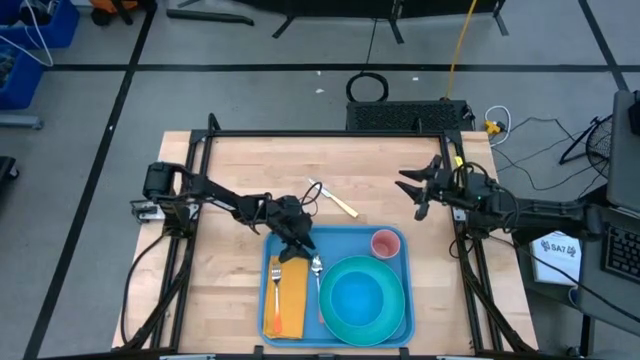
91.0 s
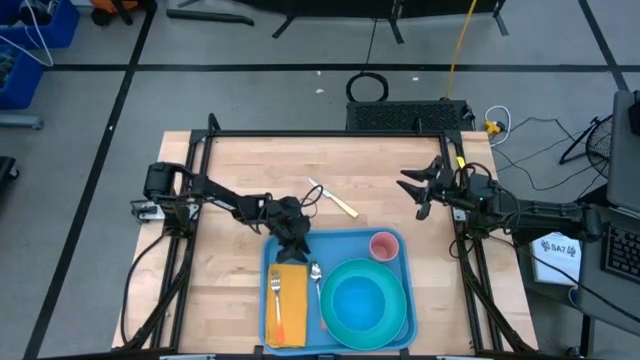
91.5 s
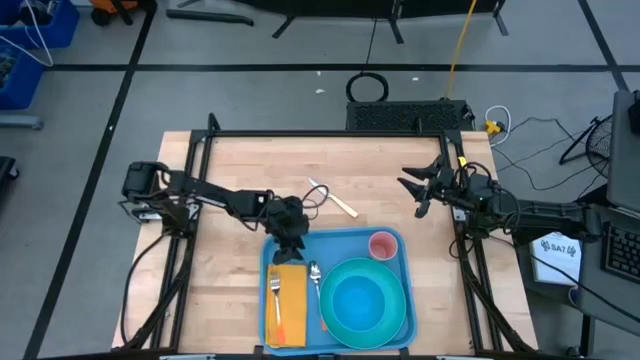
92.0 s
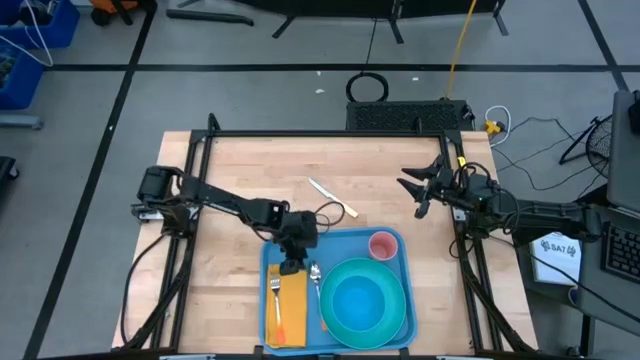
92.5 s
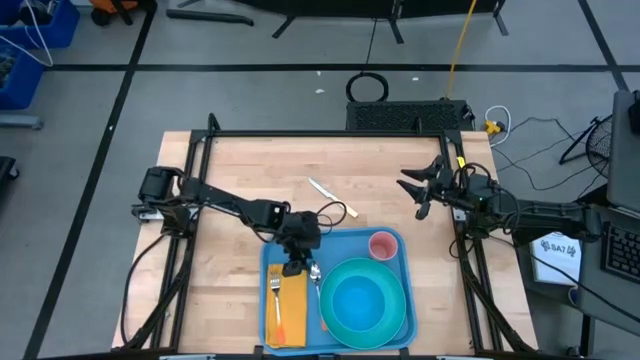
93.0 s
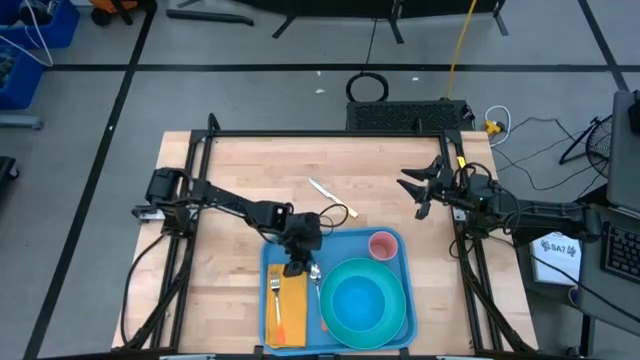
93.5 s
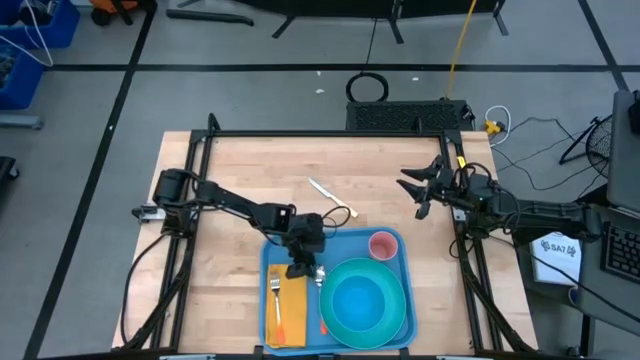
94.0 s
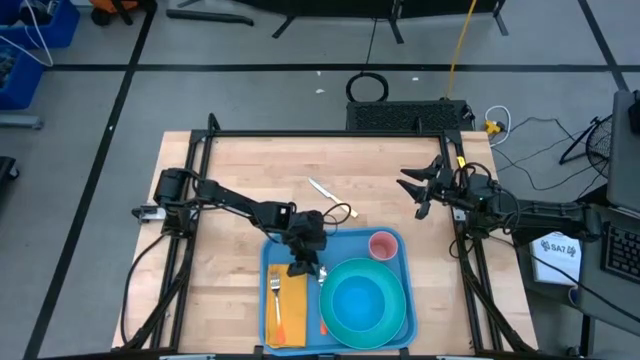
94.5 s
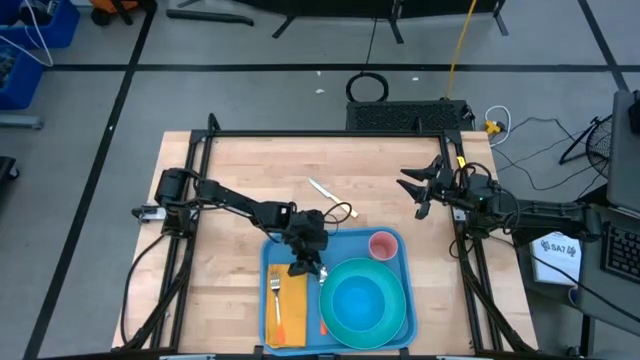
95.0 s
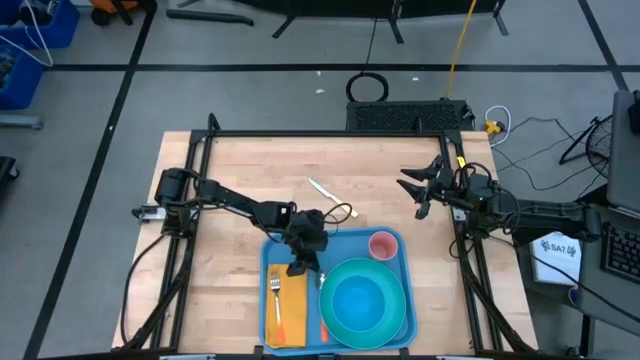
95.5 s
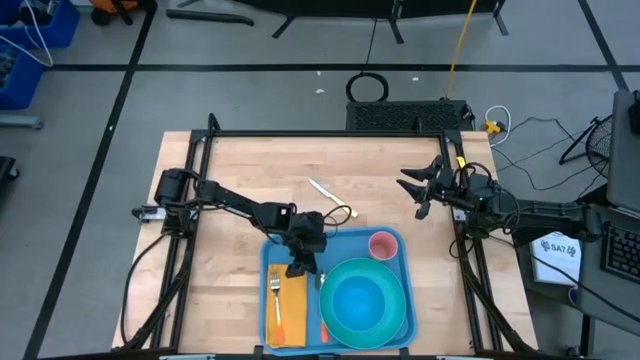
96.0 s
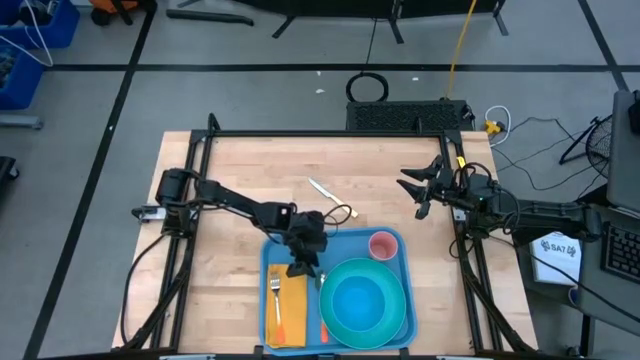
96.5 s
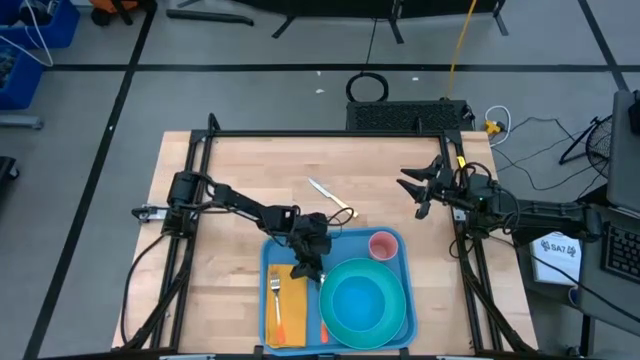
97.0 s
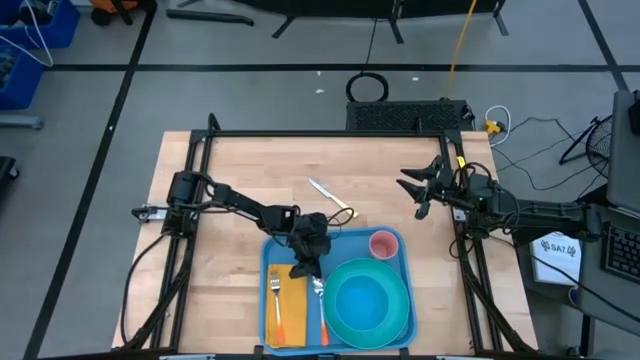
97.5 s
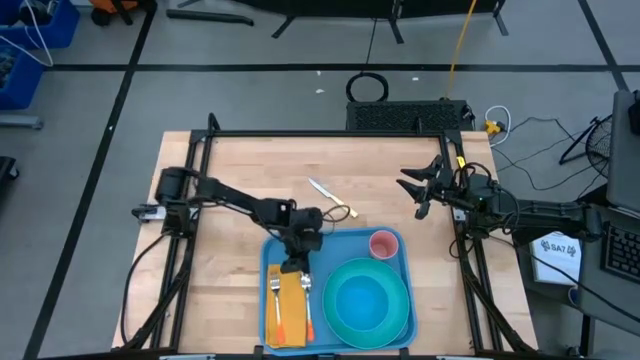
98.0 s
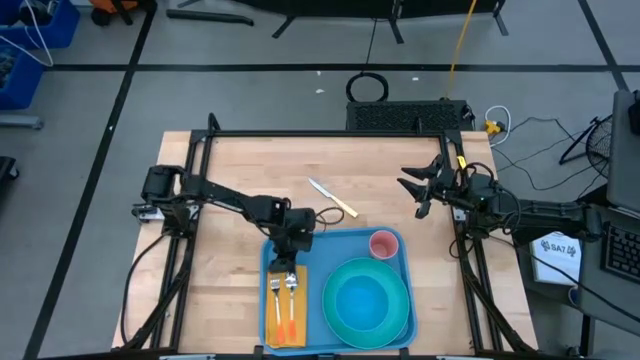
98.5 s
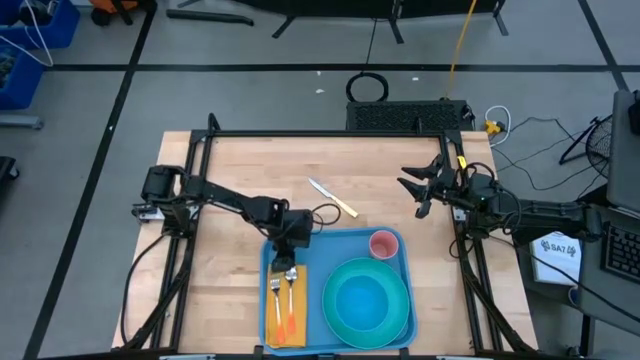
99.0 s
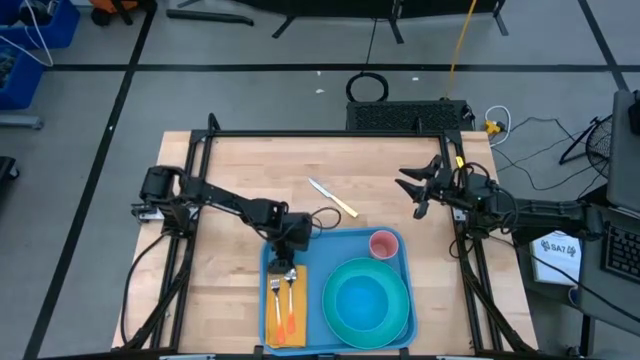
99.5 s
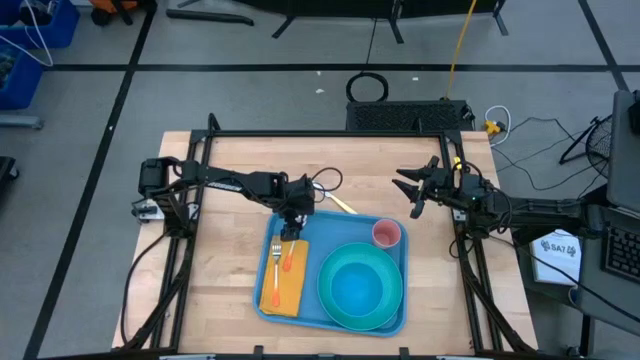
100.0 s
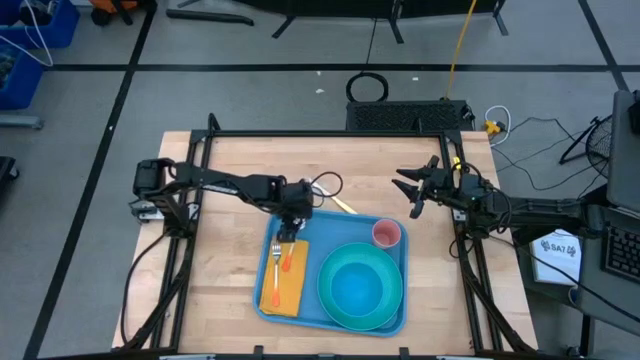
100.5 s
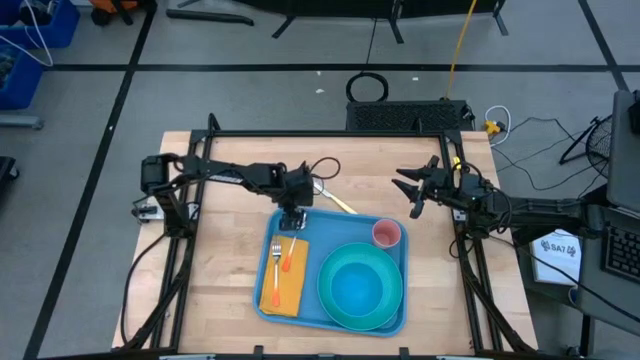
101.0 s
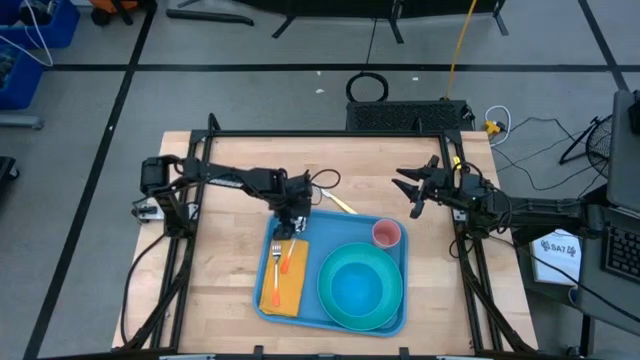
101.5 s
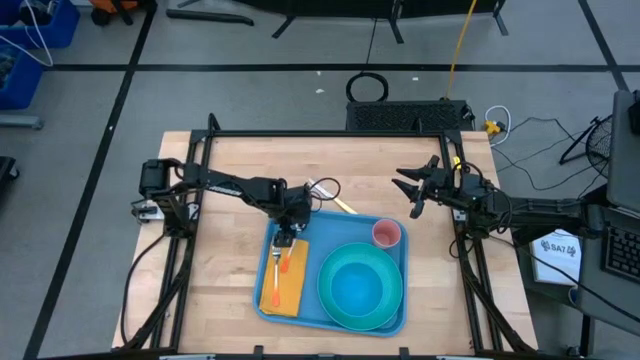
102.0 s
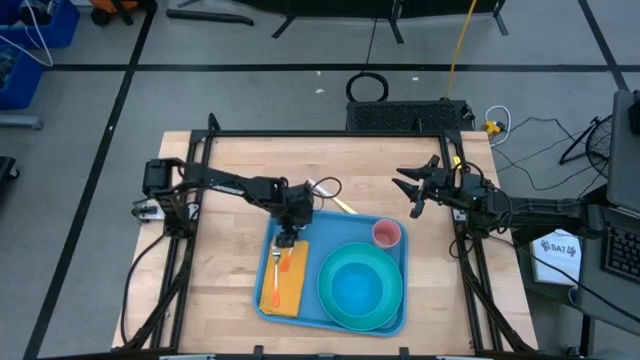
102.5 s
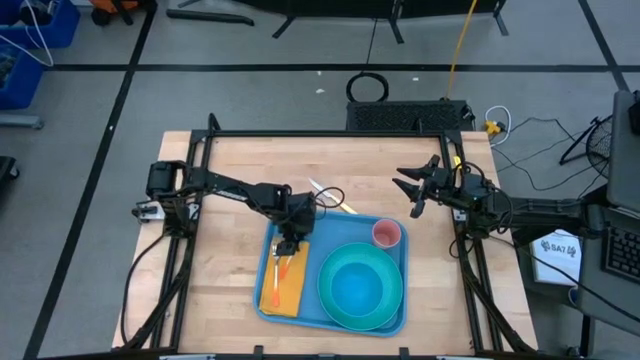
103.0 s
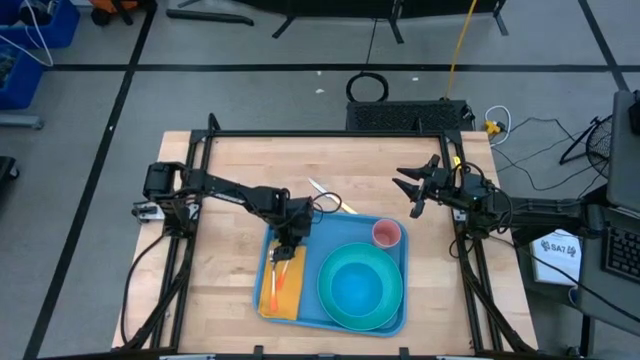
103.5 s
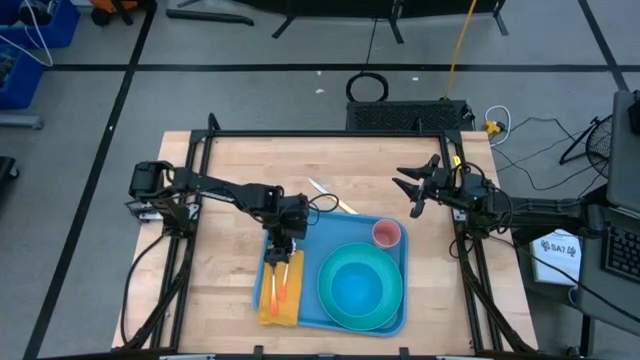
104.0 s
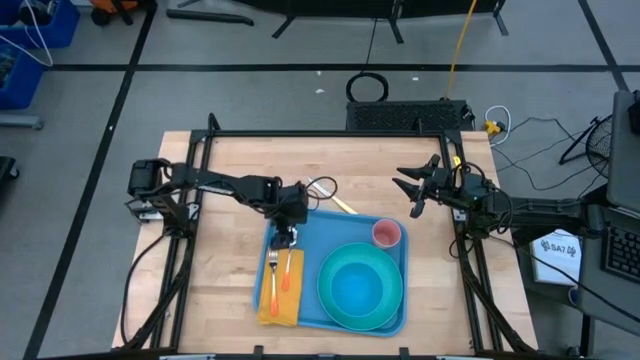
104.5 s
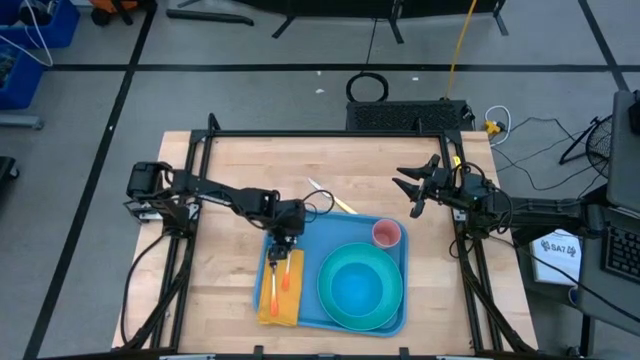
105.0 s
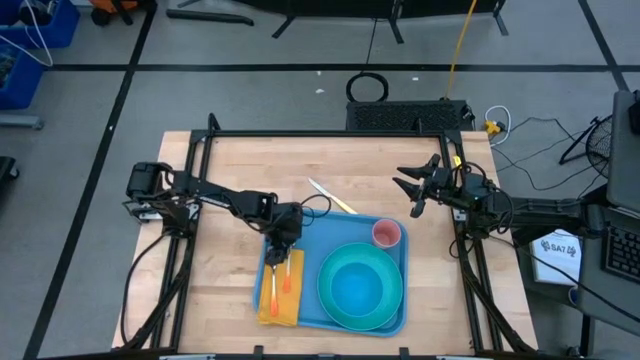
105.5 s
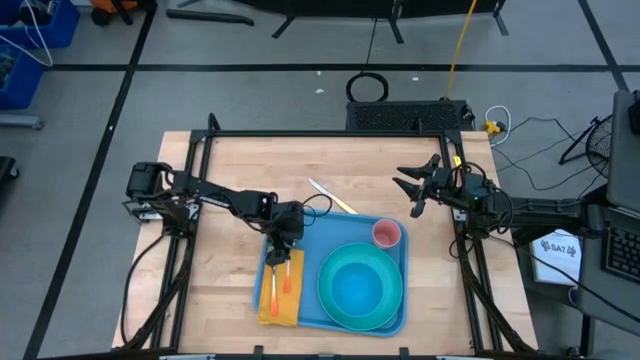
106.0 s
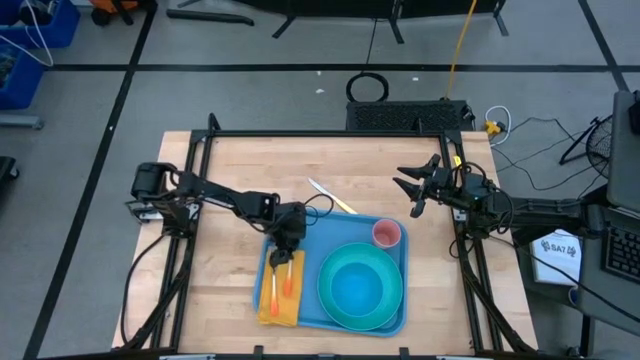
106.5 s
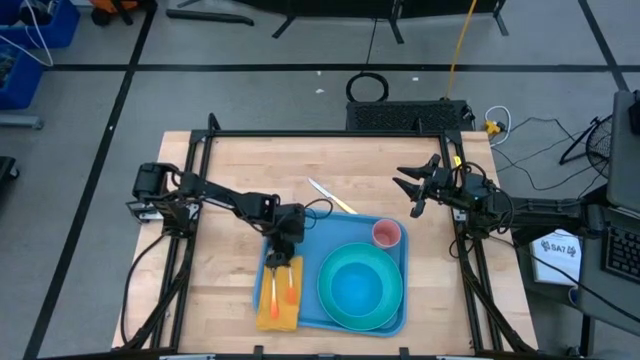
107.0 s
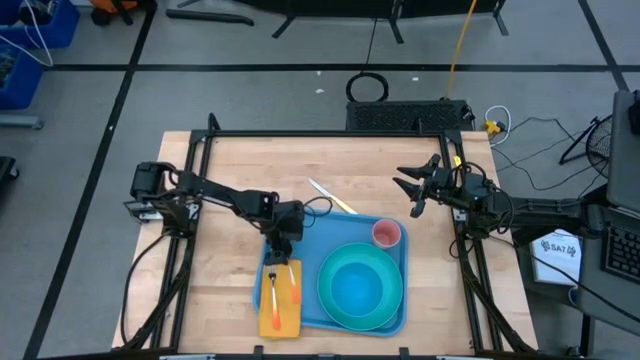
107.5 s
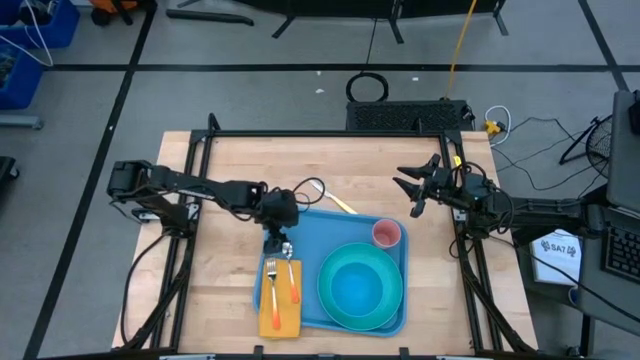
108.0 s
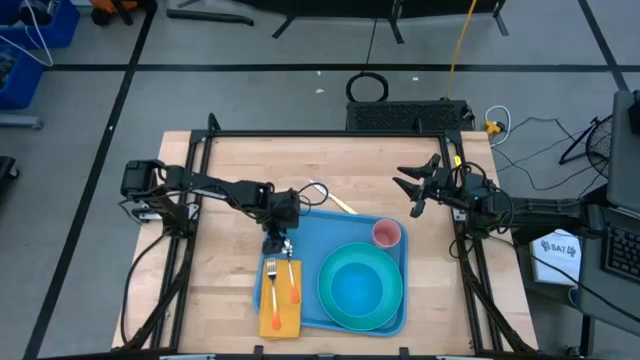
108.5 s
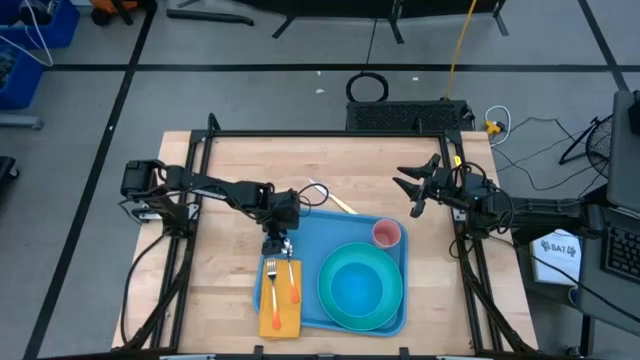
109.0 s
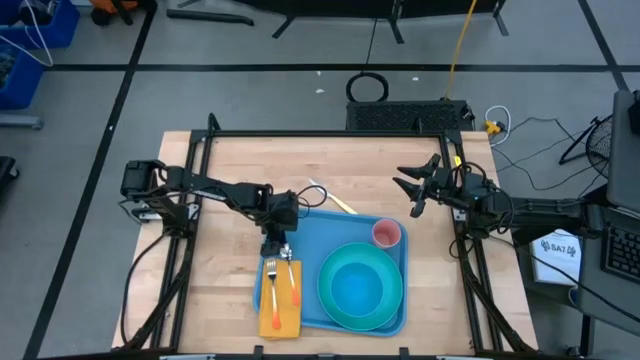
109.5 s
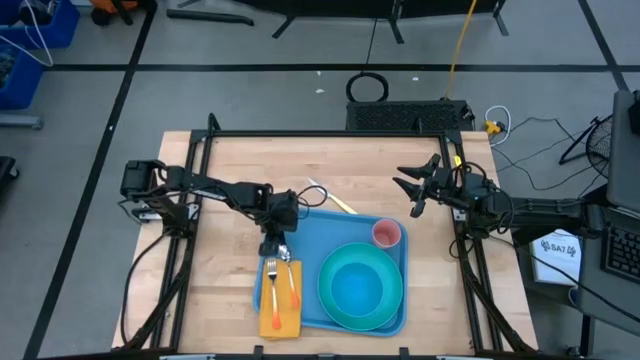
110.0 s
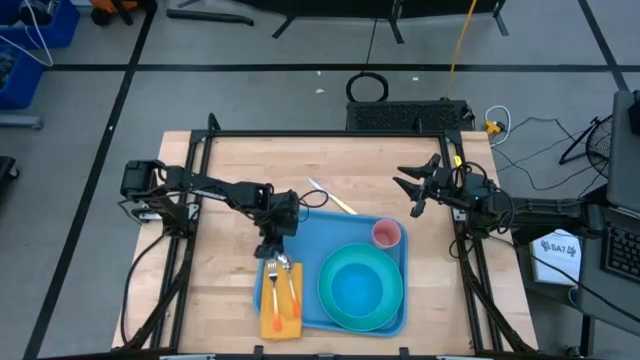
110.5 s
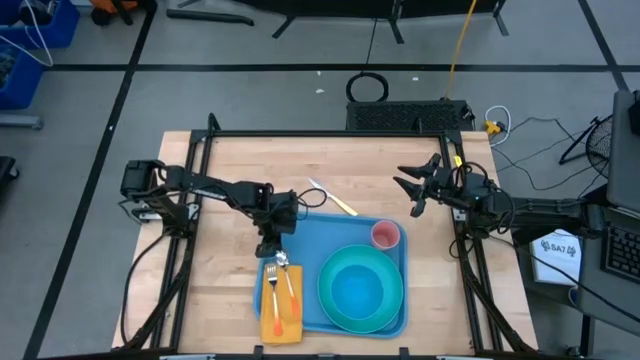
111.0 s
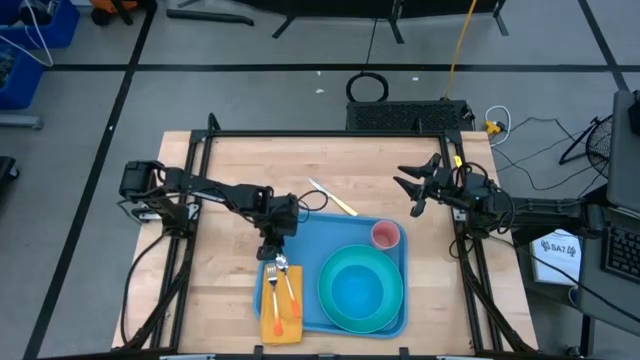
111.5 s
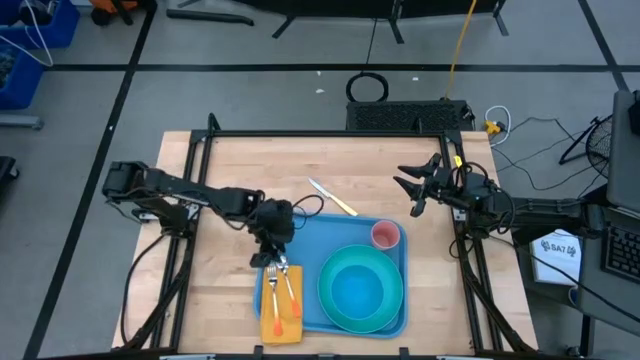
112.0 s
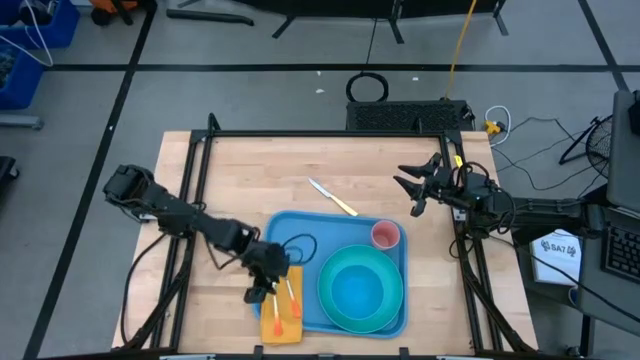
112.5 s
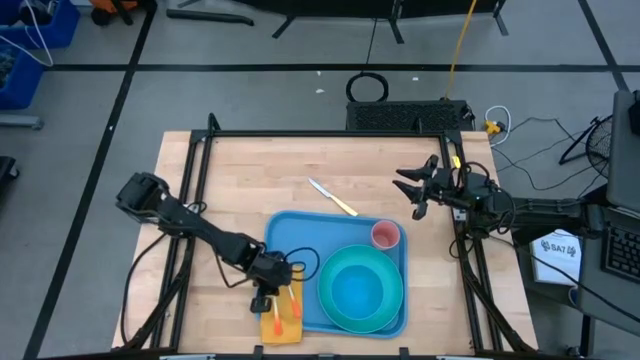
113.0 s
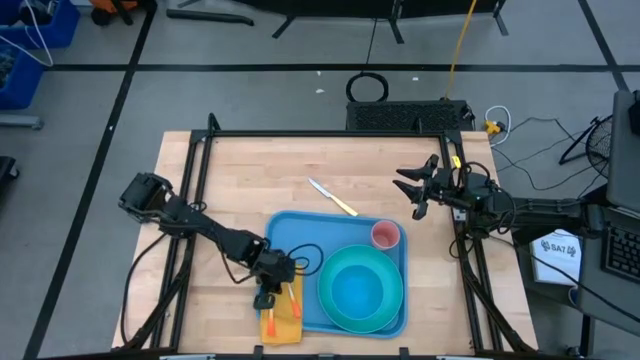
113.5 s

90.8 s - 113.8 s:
Task: Set up tray
Put the orange spoon on top of the yellow table napkin
